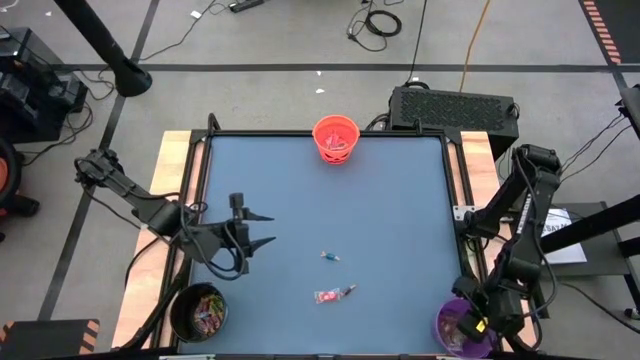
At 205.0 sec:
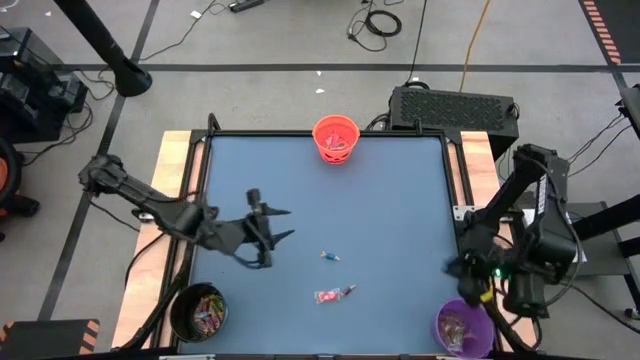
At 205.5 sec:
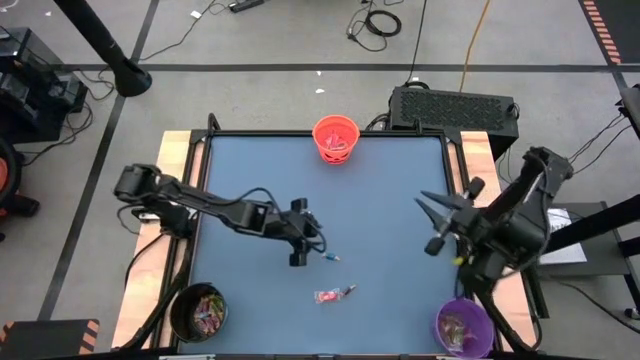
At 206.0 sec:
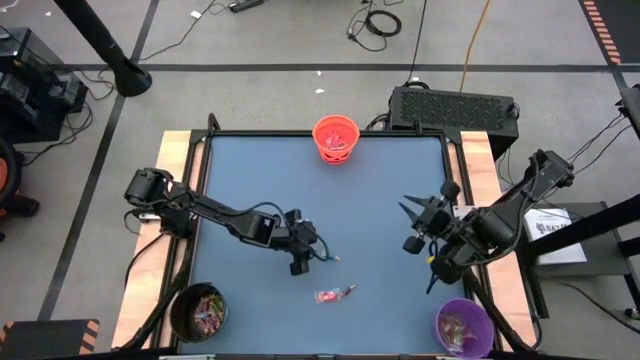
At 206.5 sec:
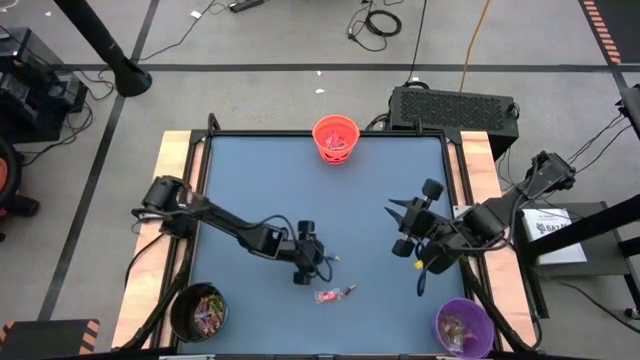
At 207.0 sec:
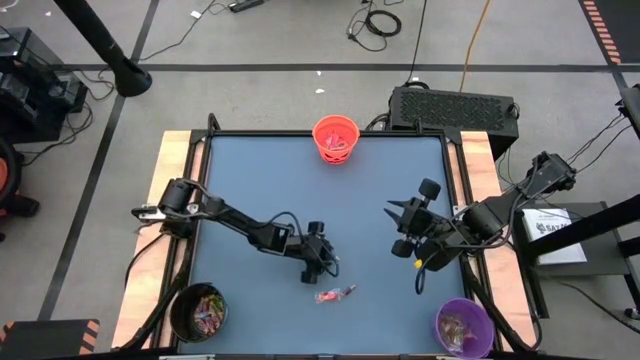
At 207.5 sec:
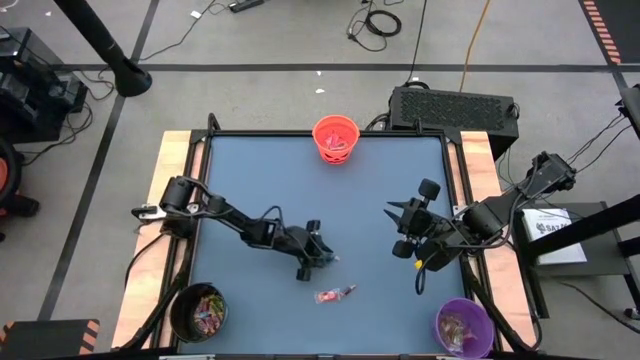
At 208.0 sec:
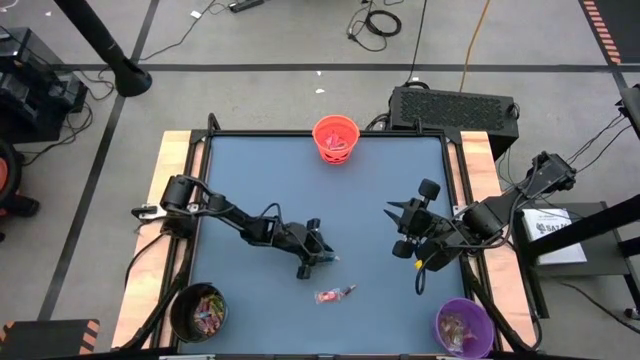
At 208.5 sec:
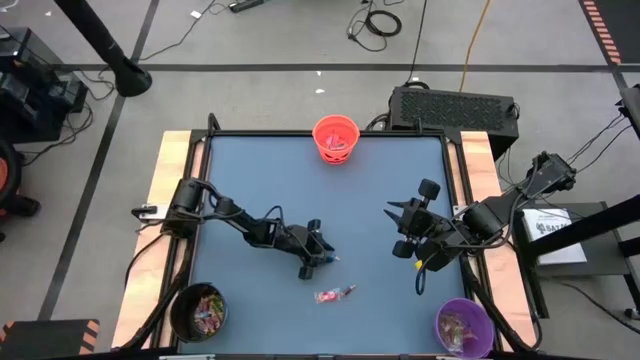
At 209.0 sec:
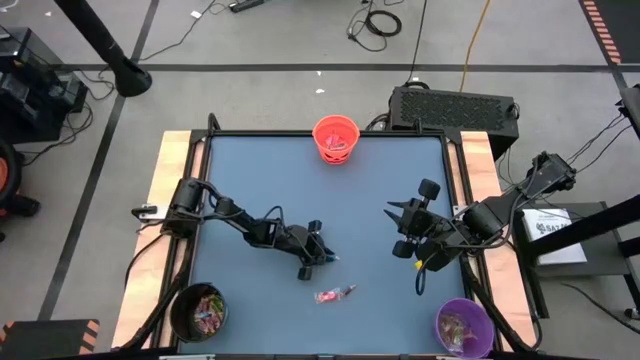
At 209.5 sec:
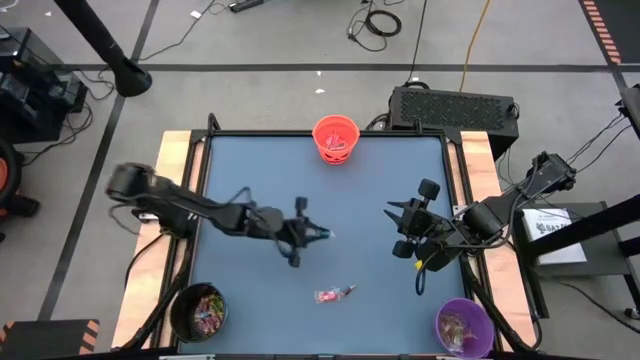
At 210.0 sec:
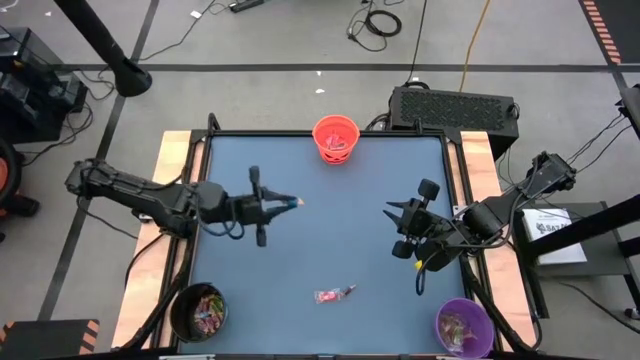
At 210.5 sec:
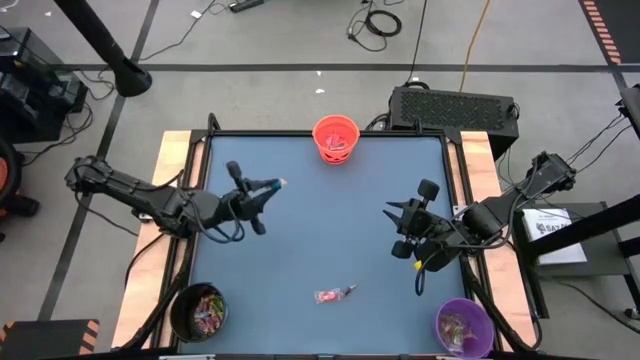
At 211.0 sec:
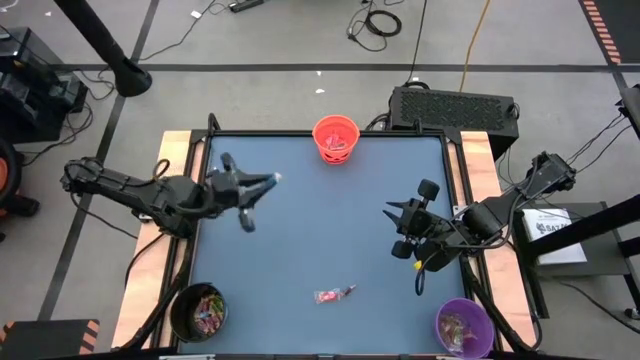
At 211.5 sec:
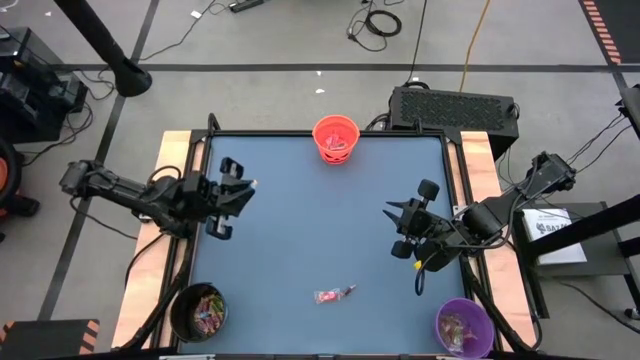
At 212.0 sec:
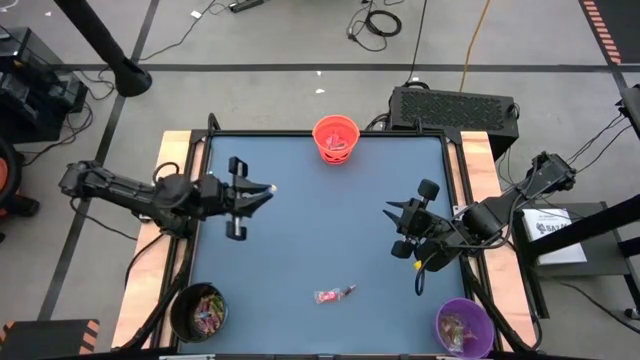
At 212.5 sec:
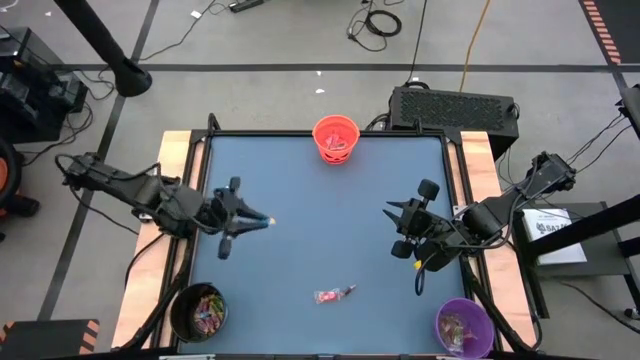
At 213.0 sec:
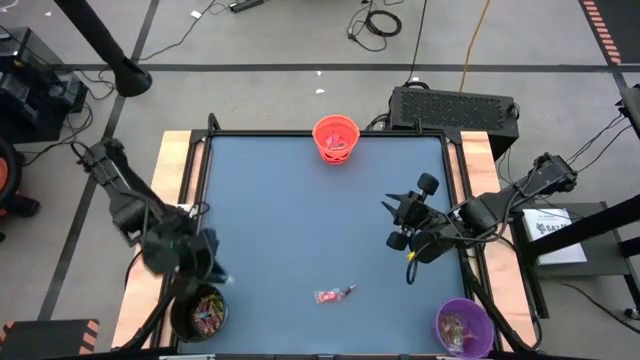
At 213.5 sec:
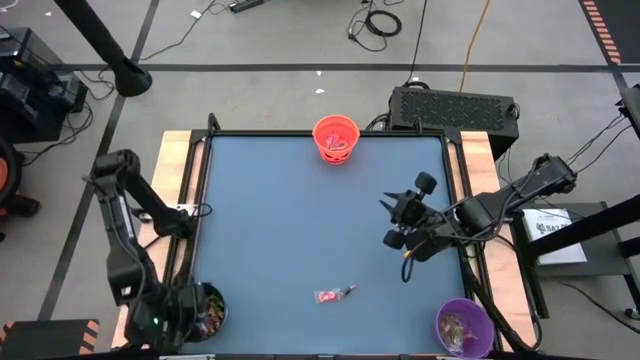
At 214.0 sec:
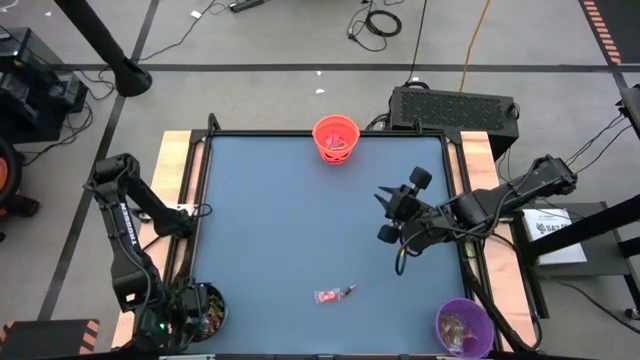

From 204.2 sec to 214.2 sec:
Task: Sort candy by brand, put in halloween buckets
Put the blue candy into the black bucket

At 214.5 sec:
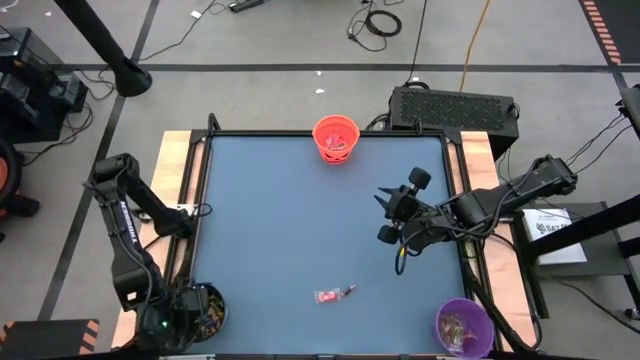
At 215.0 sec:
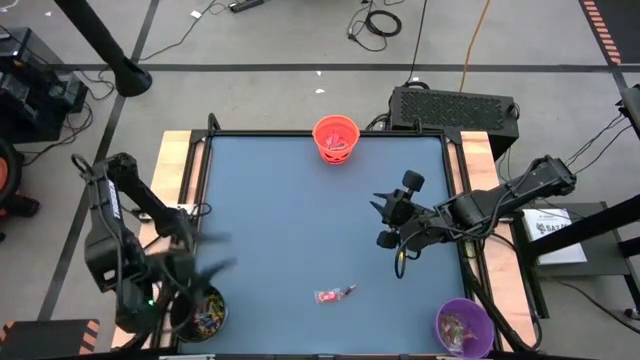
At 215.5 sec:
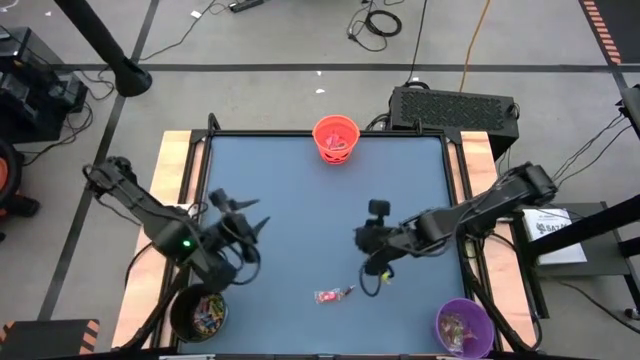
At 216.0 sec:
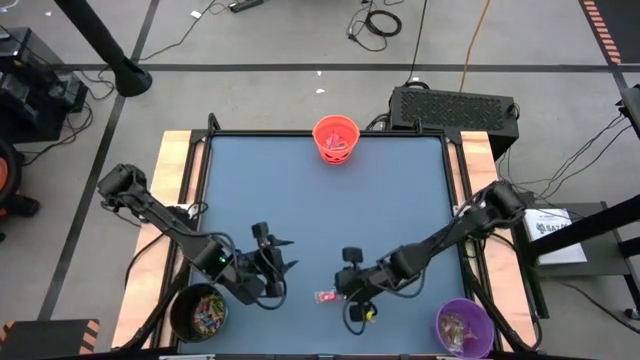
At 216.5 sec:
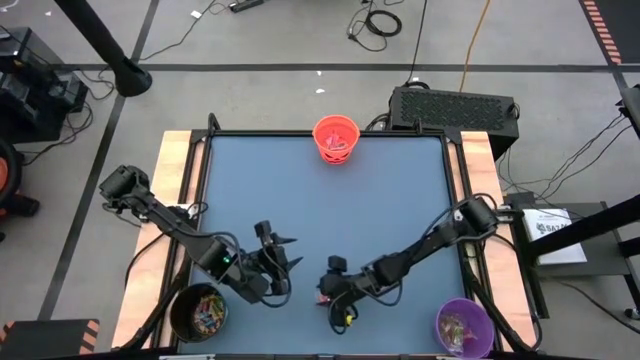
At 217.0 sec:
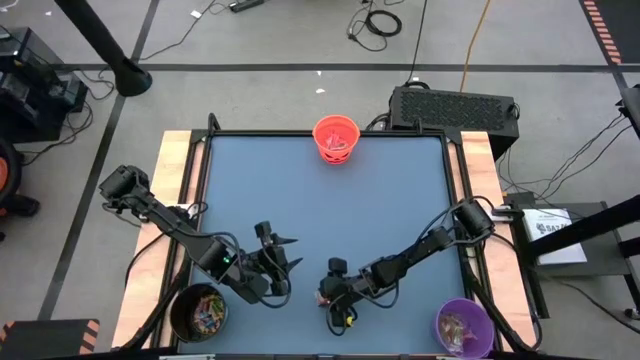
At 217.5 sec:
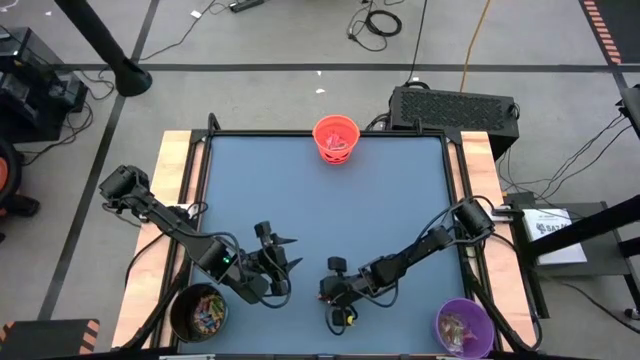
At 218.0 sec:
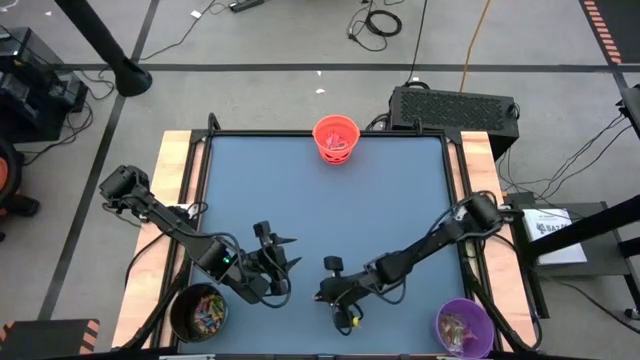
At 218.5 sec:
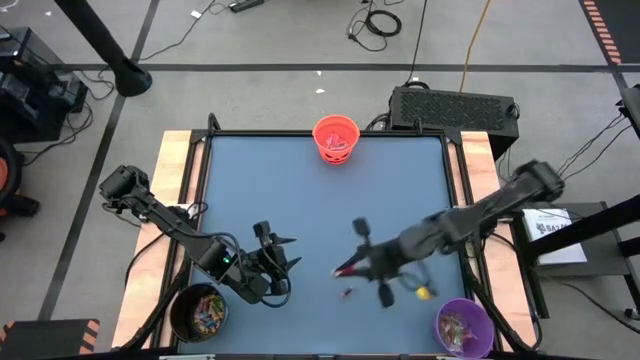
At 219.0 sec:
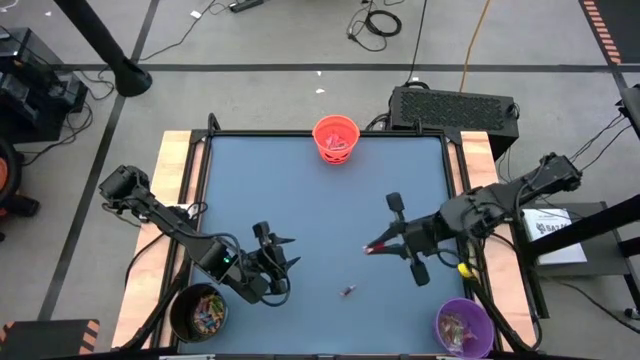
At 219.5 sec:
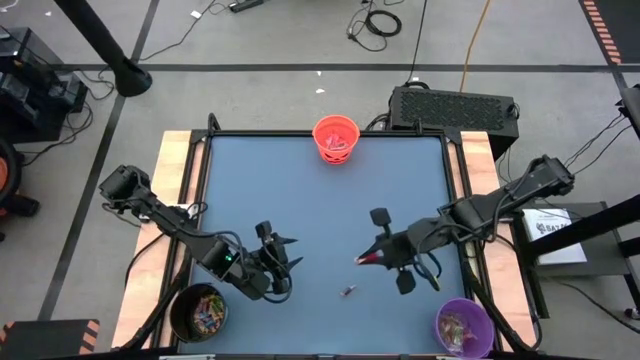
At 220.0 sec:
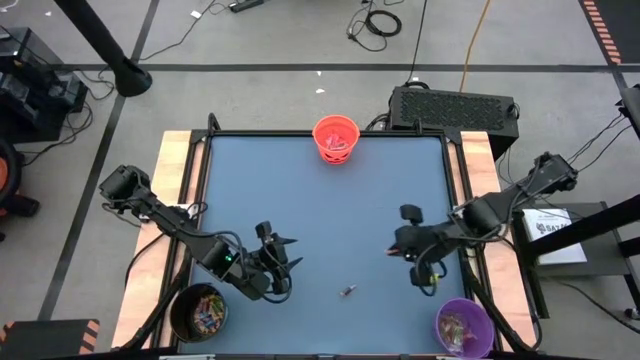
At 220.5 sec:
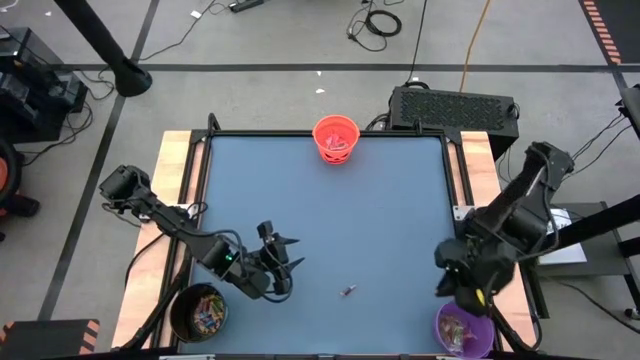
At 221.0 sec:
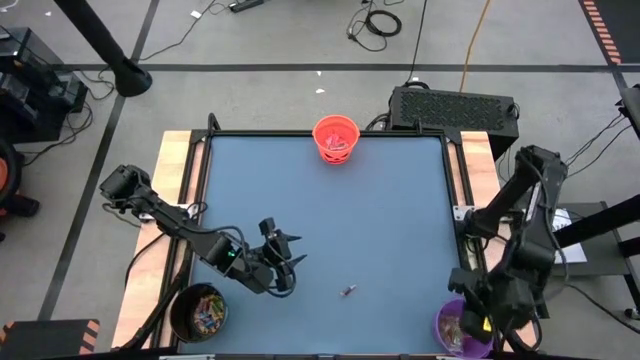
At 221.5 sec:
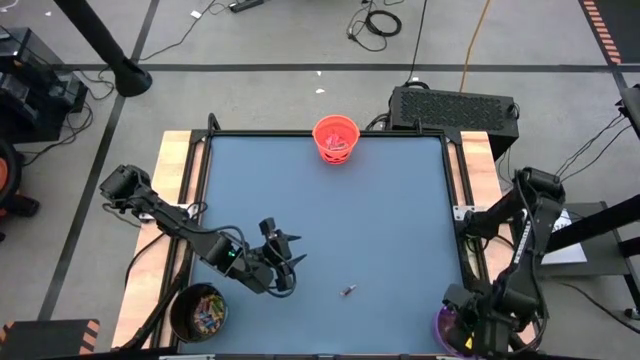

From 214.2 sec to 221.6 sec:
Put the small orange gummy into the purple bucket
